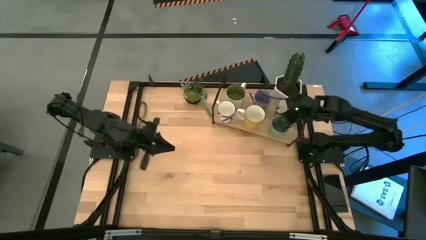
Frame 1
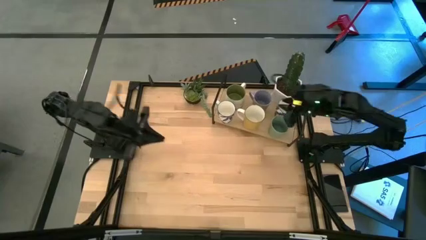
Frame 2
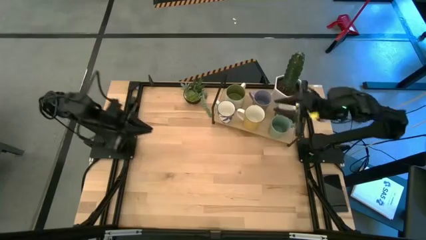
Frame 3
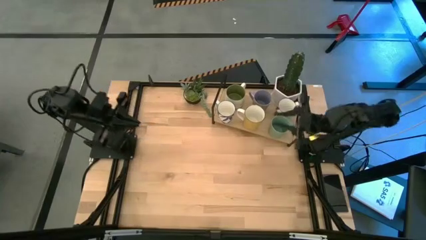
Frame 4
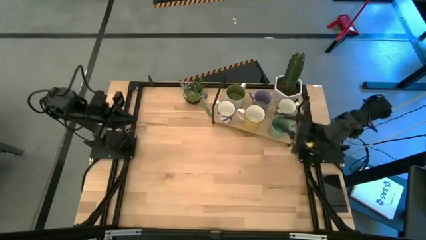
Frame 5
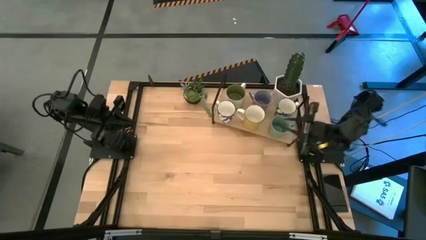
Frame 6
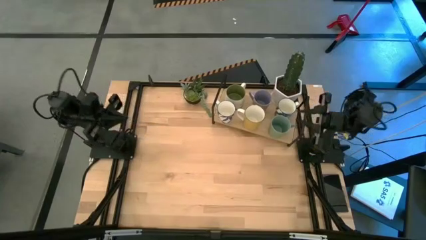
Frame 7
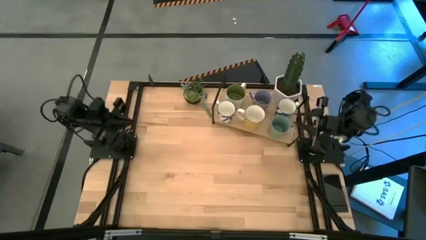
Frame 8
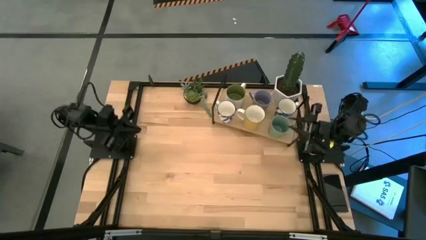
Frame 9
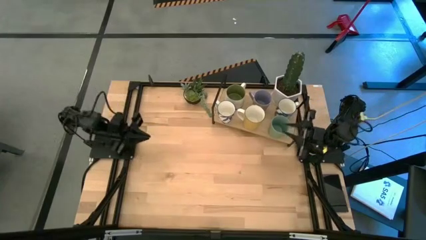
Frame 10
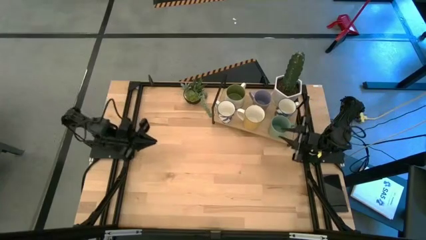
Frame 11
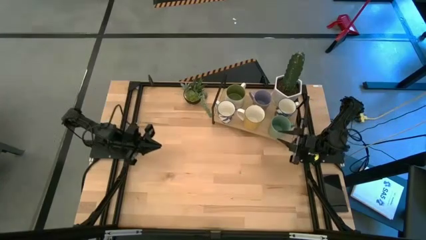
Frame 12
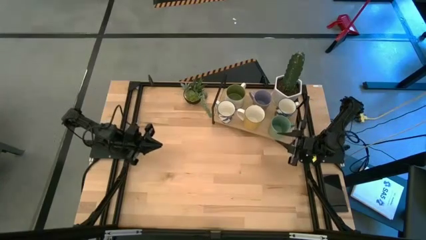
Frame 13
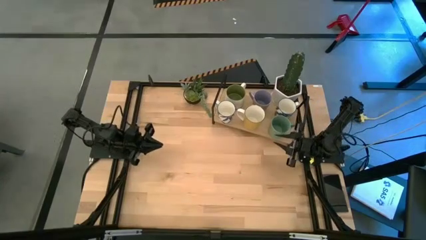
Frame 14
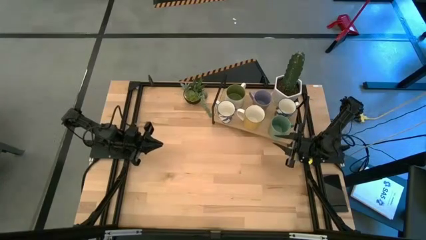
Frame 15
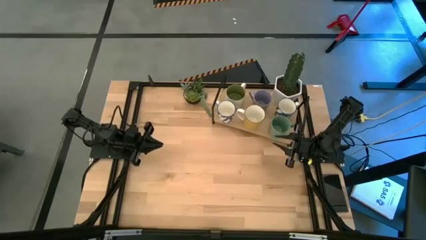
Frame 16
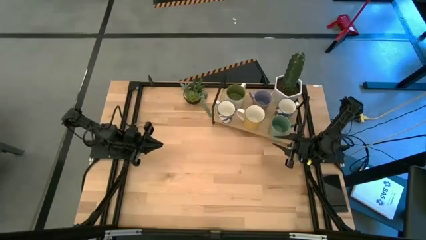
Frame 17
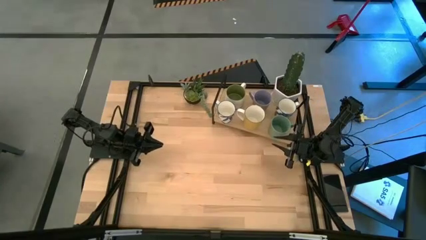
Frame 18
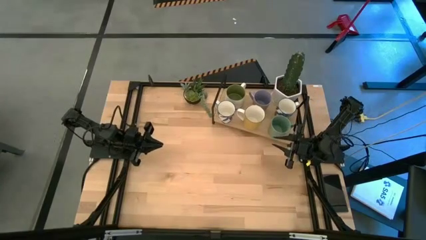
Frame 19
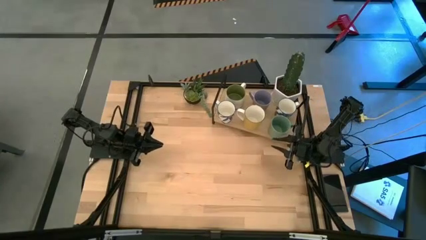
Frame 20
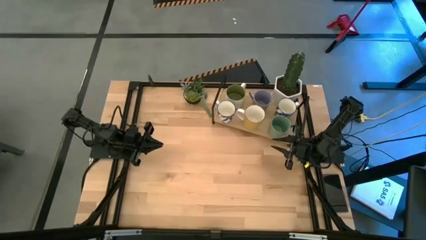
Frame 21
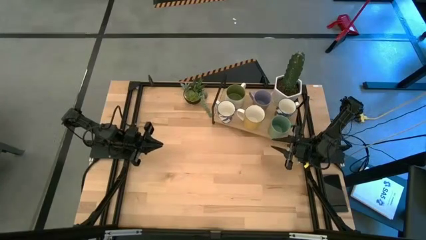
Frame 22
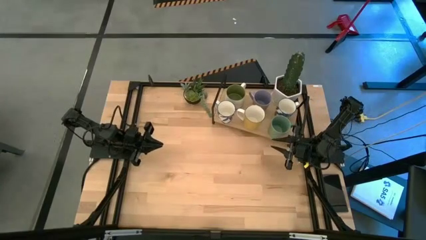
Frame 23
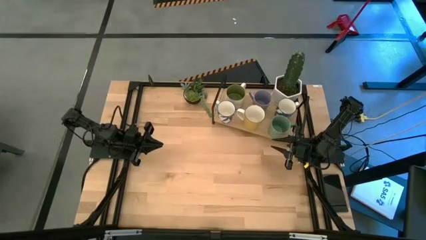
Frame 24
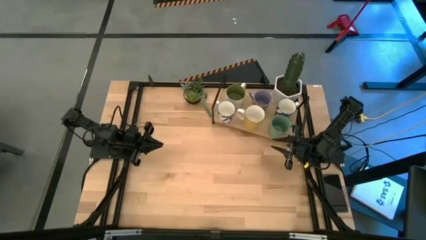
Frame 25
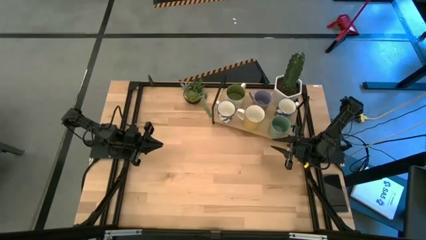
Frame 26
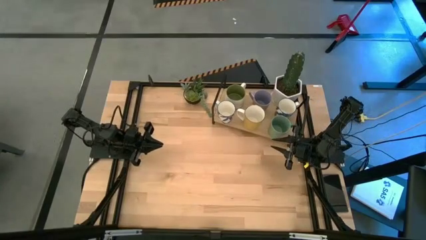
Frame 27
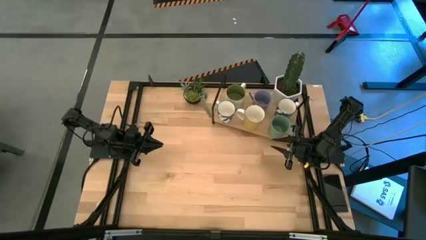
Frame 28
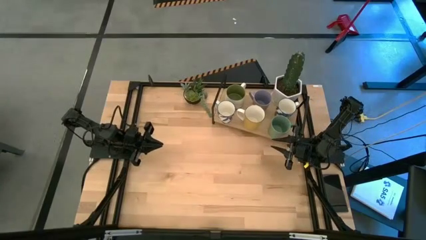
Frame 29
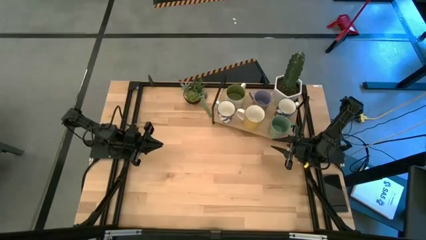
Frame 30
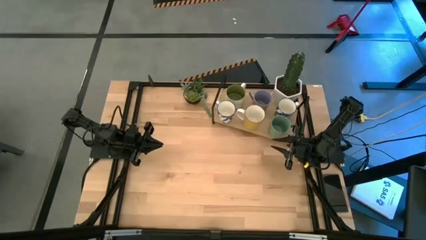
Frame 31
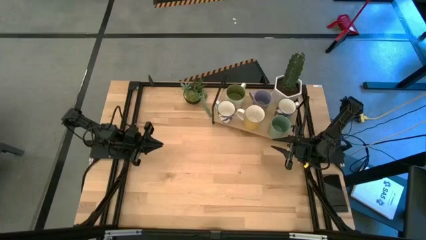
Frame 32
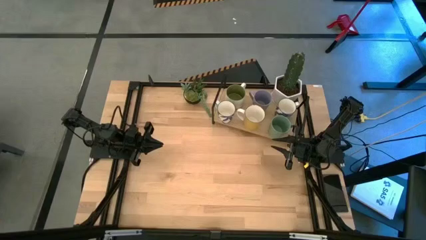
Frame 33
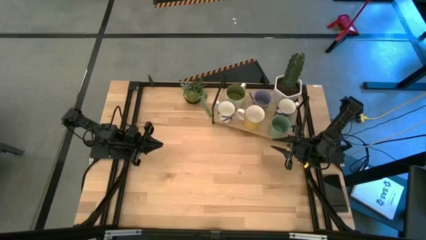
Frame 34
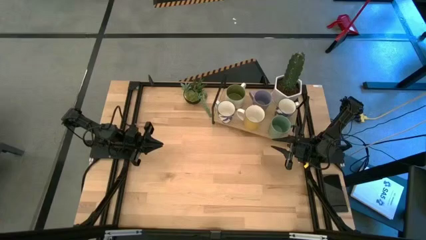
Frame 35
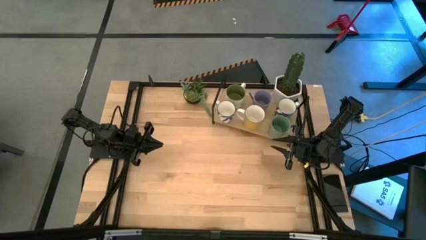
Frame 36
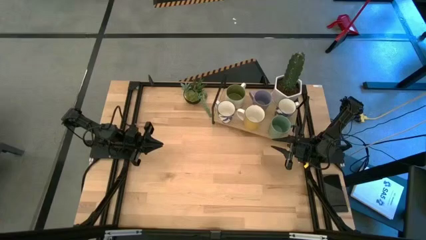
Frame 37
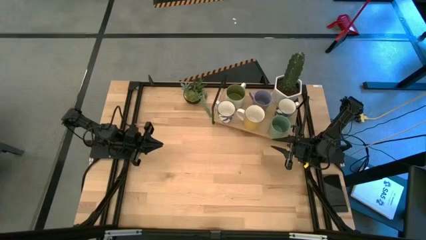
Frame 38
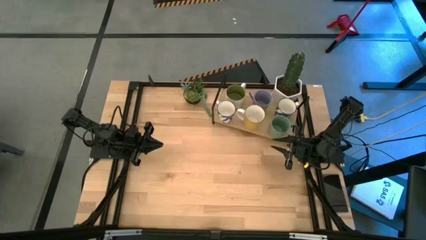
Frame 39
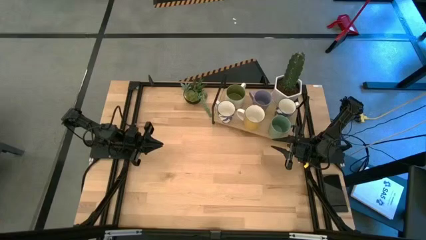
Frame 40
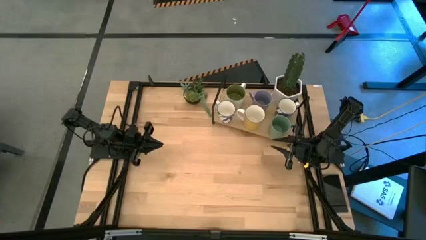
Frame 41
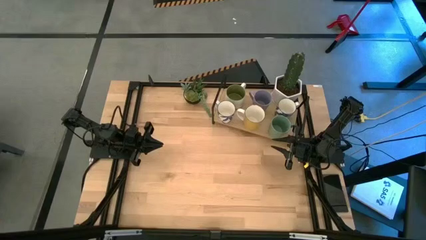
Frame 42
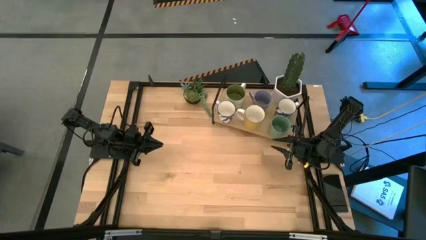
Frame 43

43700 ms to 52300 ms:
Task: Place coffee mugs
Return to Home Position

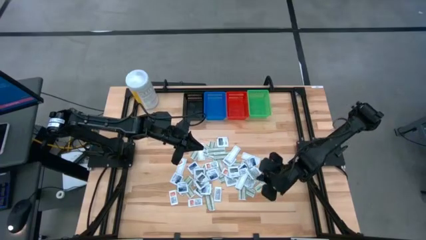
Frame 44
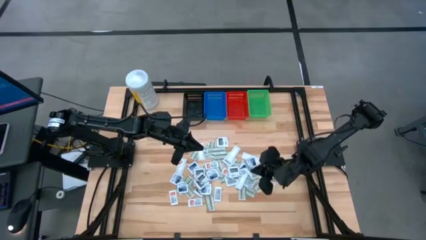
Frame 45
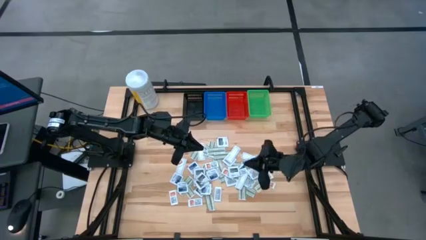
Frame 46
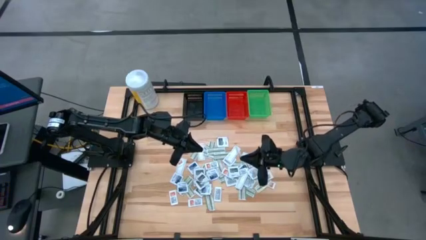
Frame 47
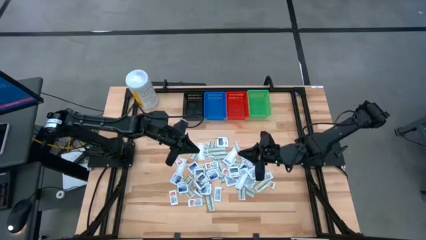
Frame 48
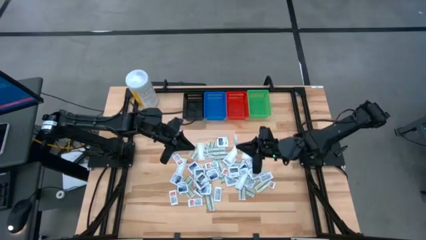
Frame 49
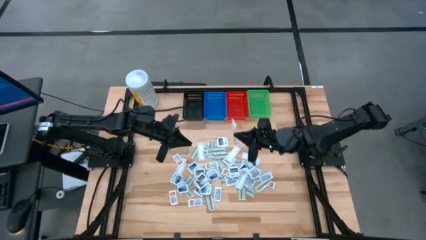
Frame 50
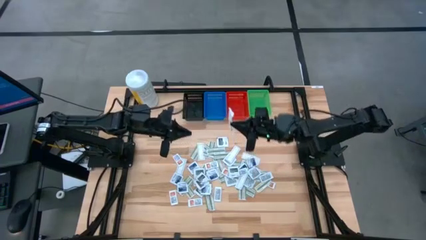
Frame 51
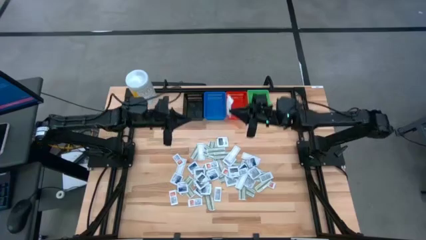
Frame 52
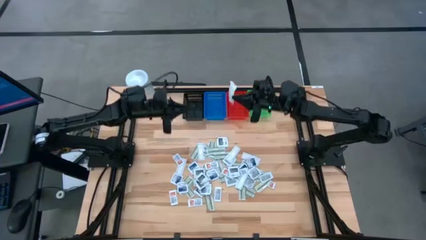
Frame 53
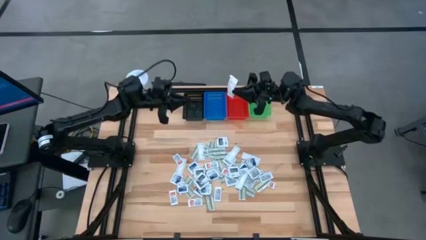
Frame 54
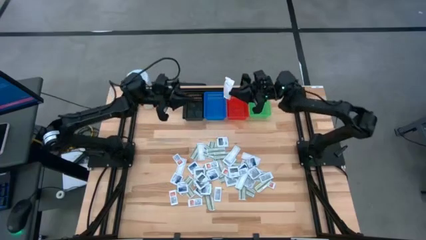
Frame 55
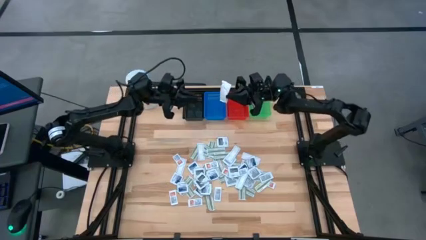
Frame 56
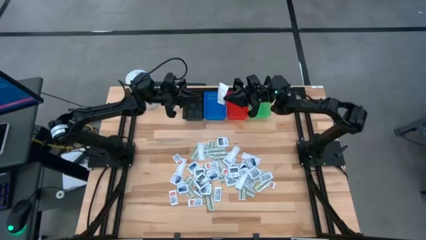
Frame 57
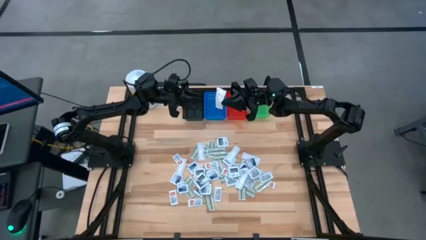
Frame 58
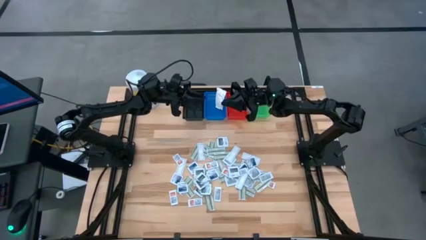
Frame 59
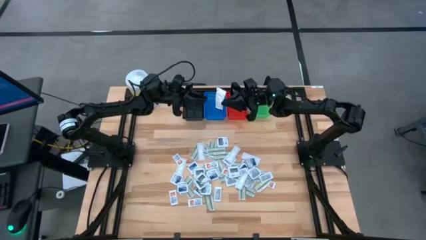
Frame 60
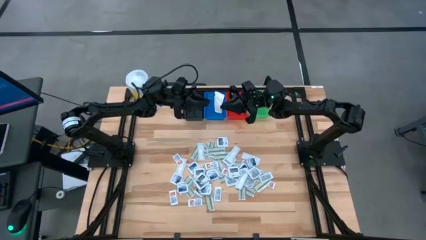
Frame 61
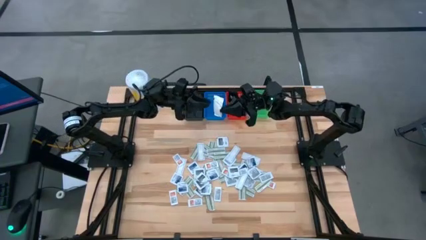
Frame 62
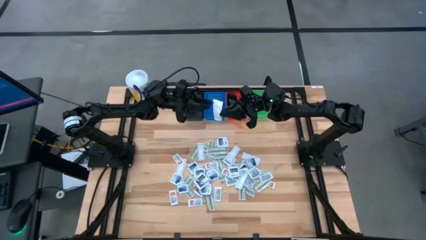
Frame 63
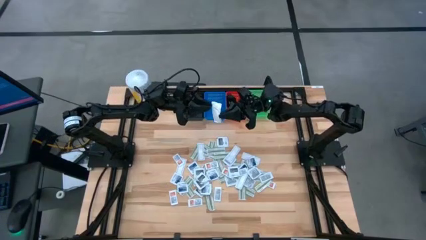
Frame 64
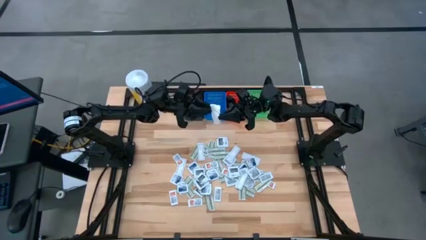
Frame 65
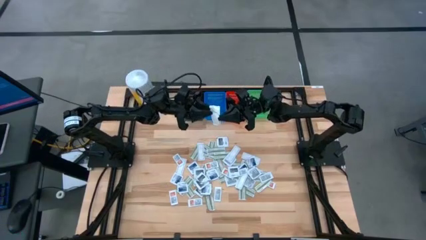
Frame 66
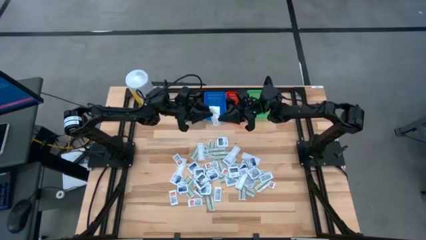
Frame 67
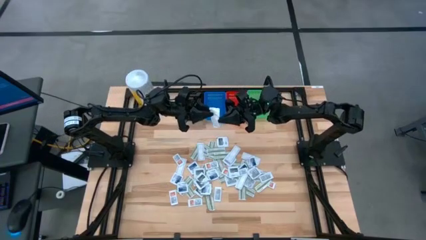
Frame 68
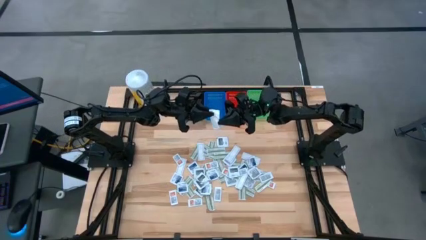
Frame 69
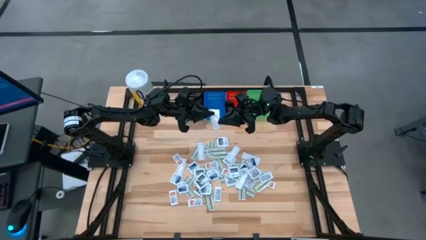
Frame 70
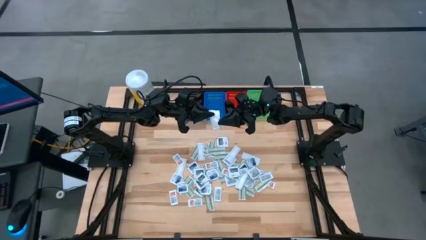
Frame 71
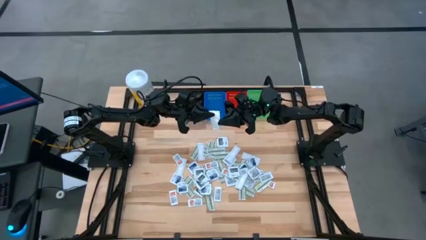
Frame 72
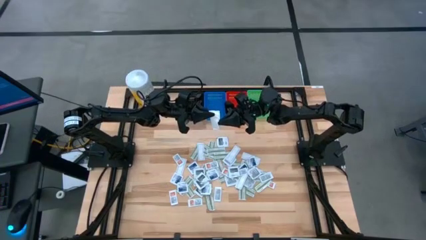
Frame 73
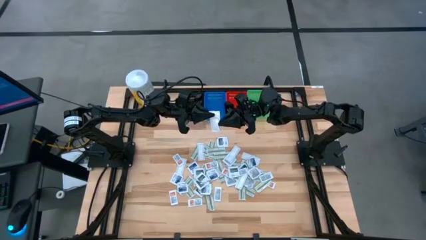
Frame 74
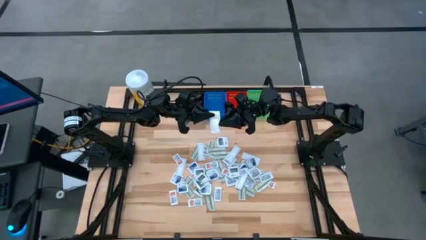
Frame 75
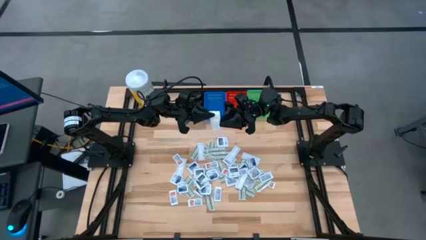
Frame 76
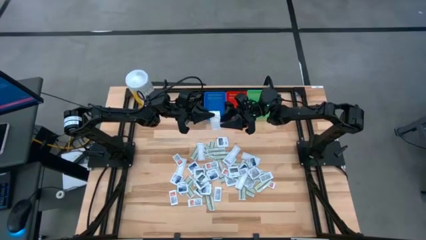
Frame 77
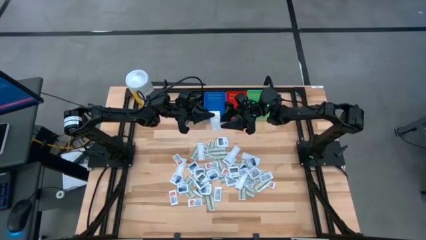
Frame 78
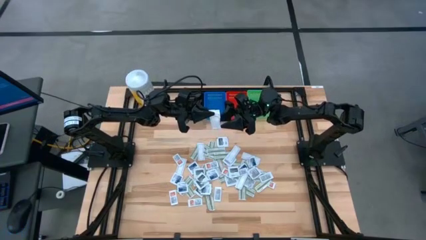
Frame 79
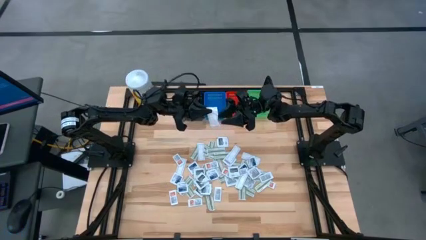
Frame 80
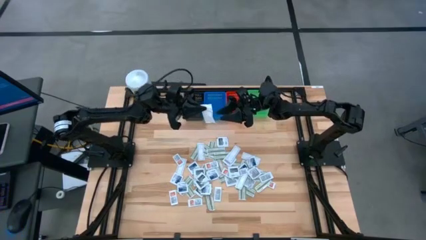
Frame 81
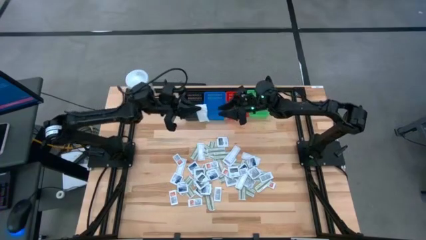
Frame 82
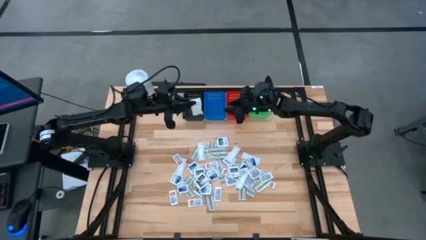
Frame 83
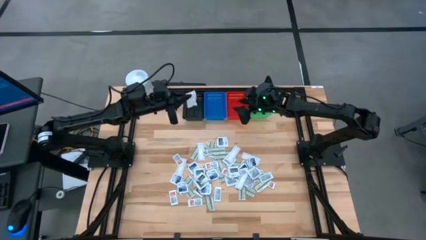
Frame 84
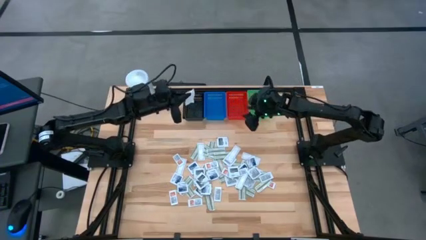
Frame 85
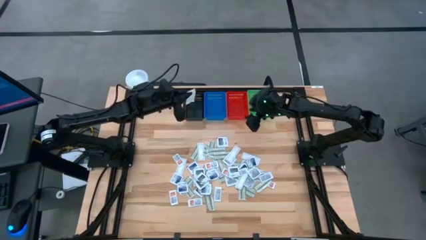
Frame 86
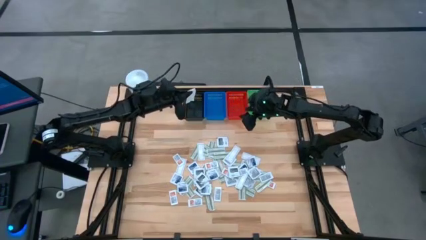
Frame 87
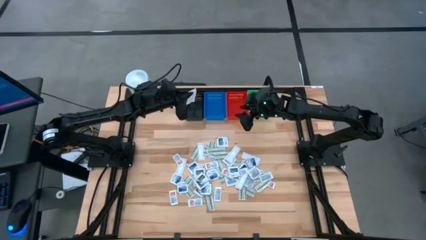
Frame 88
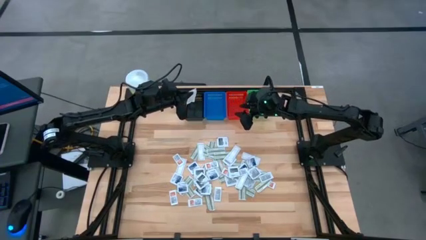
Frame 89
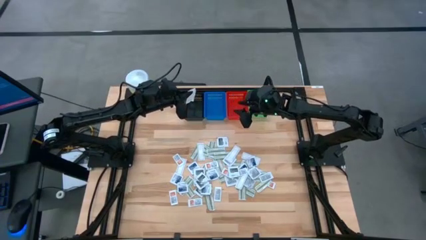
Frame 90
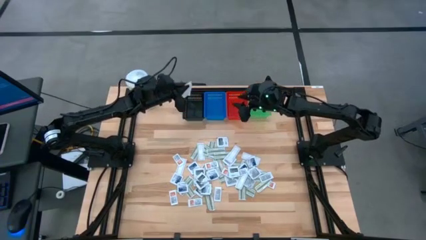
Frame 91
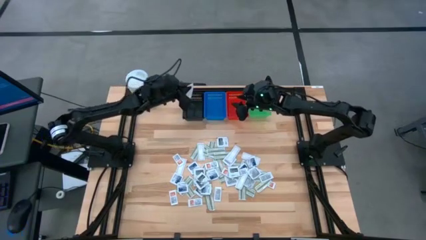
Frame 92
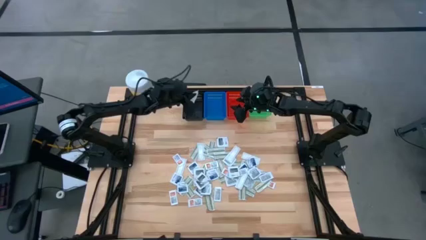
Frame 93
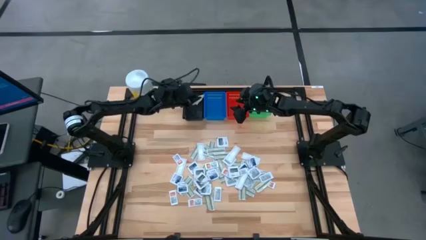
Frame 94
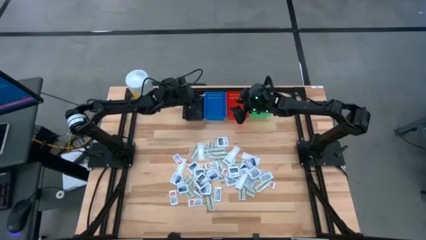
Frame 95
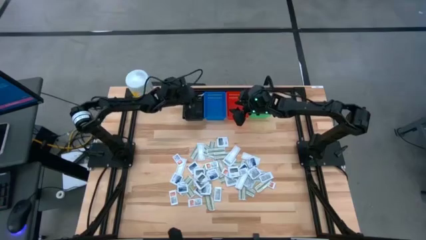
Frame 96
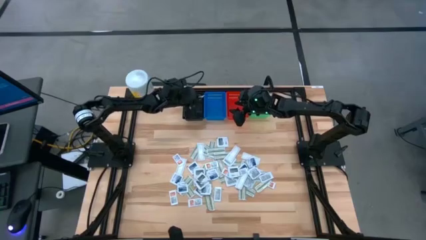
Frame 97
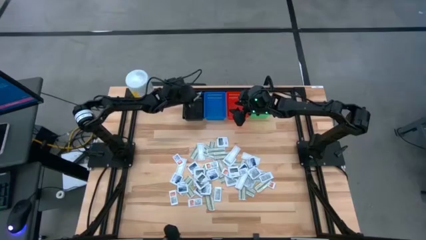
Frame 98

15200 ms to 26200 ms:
Task: Pick & Place First Aid Supplies
Put the green bandage pack in the black bin
